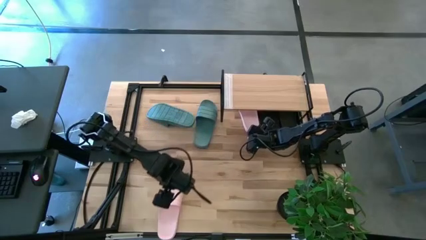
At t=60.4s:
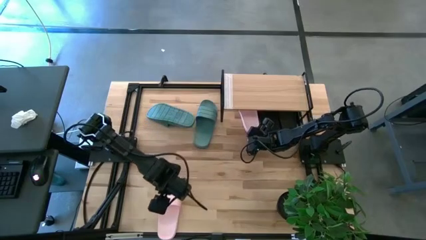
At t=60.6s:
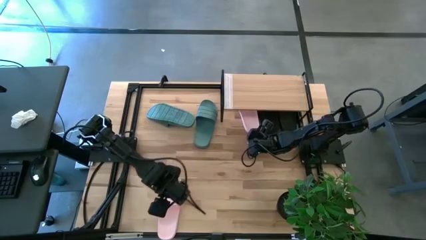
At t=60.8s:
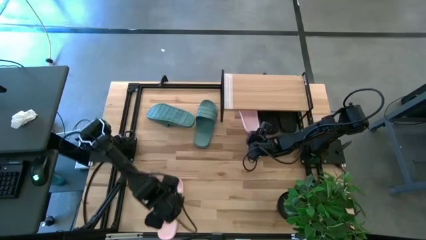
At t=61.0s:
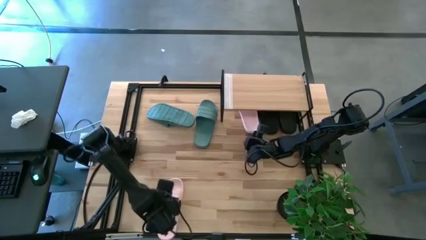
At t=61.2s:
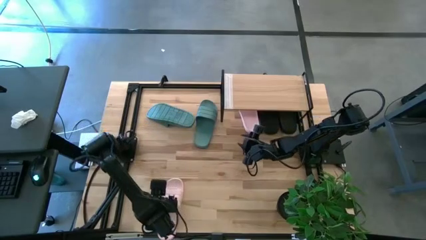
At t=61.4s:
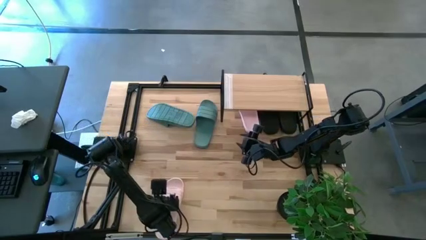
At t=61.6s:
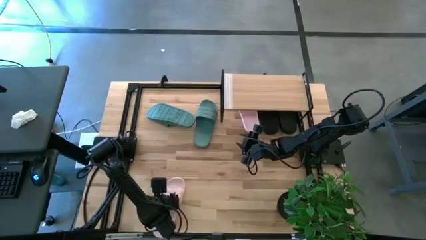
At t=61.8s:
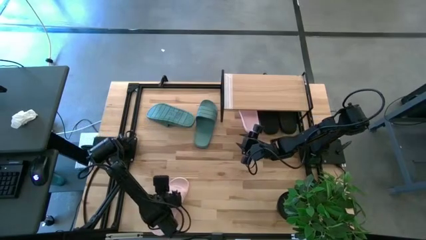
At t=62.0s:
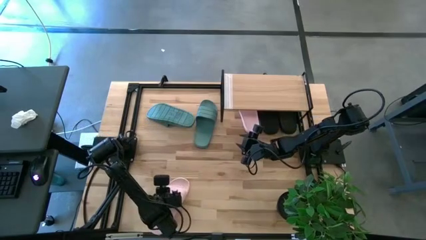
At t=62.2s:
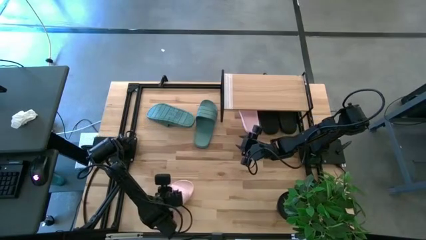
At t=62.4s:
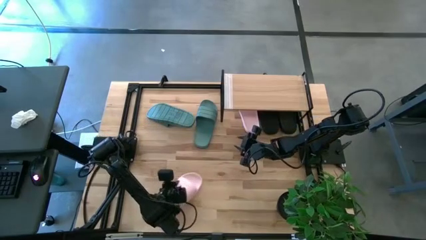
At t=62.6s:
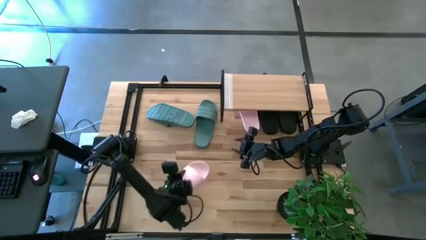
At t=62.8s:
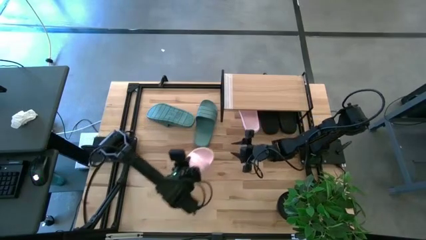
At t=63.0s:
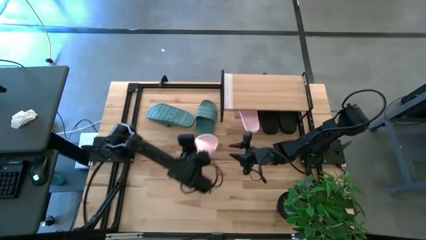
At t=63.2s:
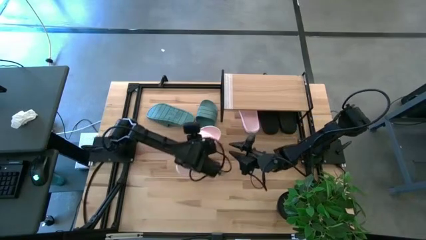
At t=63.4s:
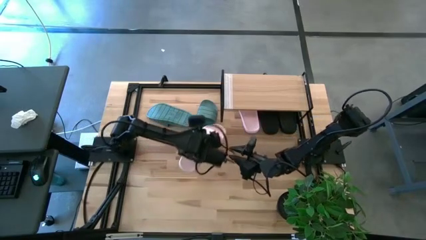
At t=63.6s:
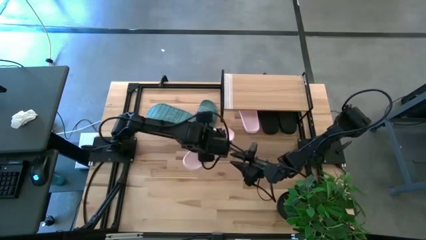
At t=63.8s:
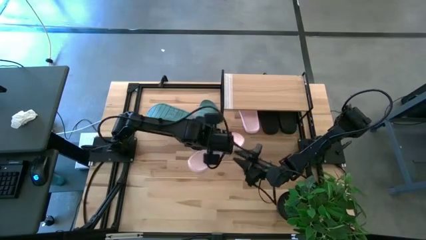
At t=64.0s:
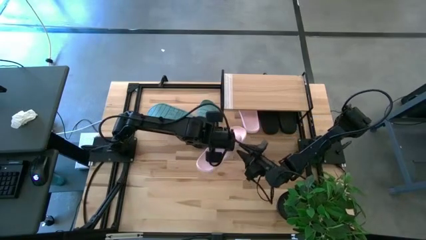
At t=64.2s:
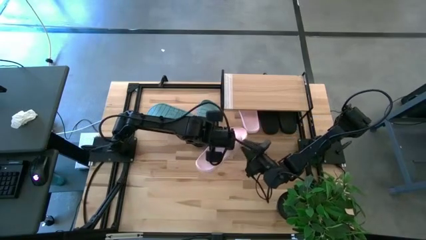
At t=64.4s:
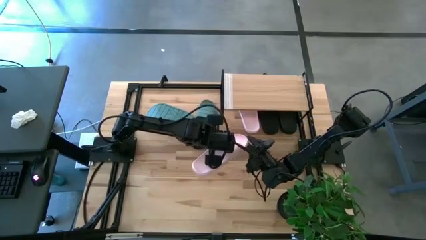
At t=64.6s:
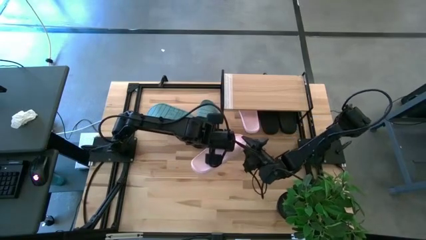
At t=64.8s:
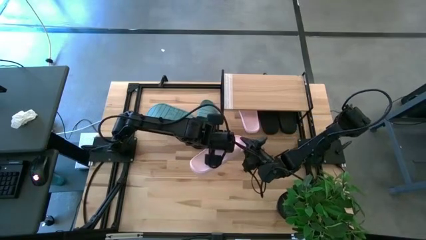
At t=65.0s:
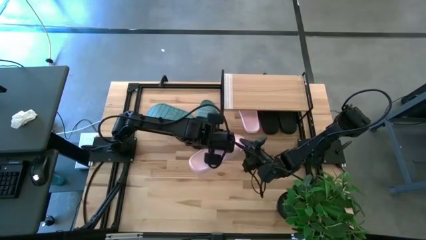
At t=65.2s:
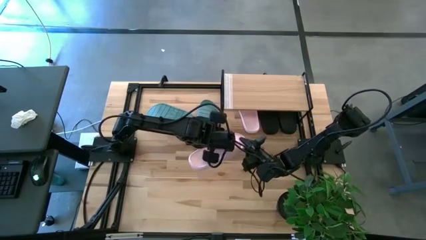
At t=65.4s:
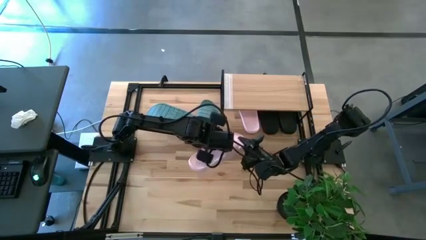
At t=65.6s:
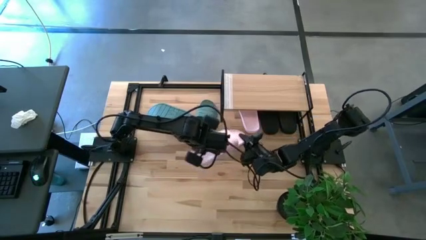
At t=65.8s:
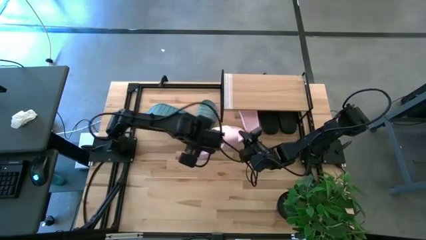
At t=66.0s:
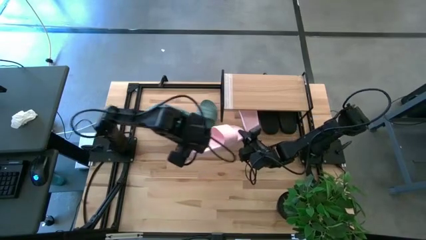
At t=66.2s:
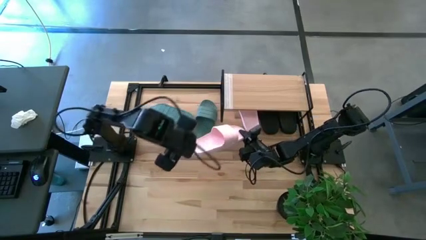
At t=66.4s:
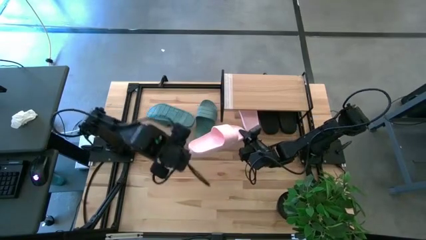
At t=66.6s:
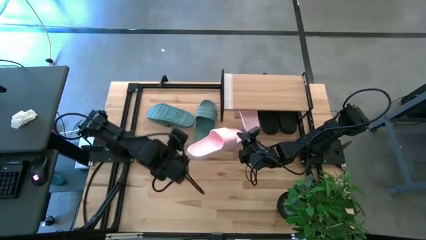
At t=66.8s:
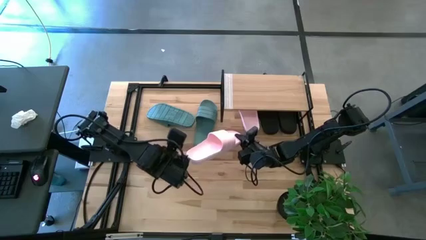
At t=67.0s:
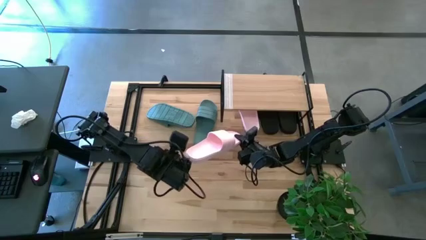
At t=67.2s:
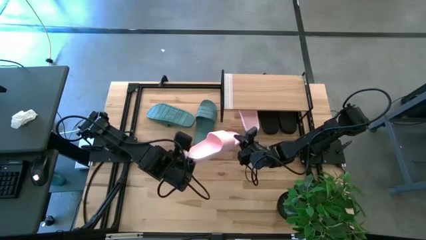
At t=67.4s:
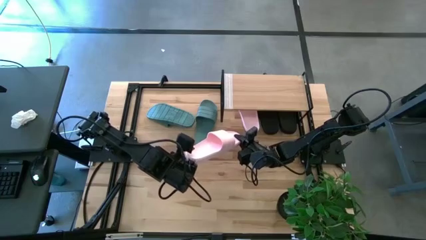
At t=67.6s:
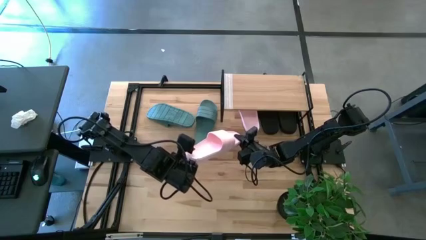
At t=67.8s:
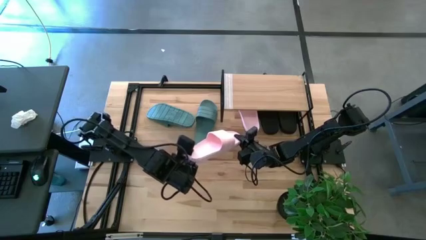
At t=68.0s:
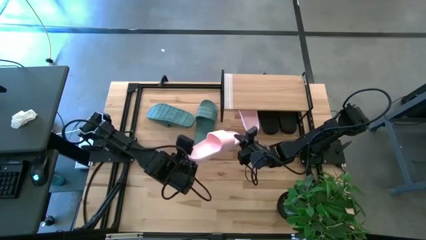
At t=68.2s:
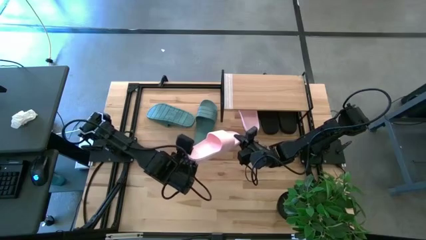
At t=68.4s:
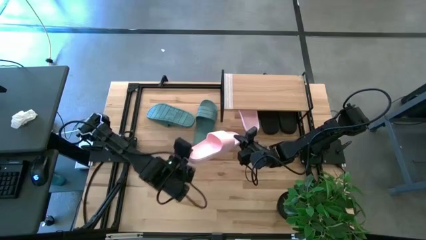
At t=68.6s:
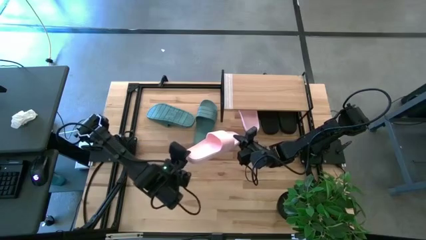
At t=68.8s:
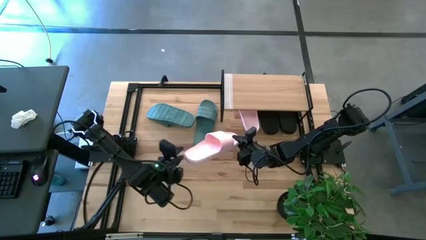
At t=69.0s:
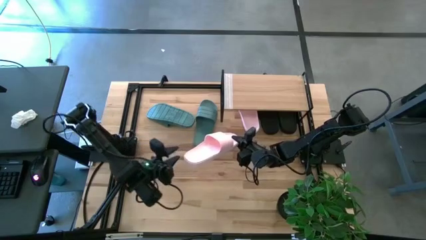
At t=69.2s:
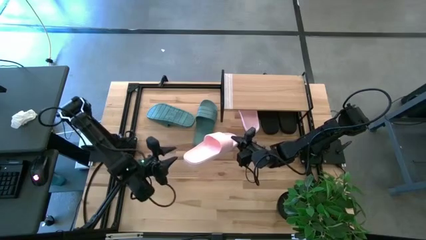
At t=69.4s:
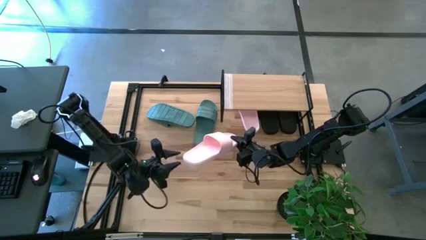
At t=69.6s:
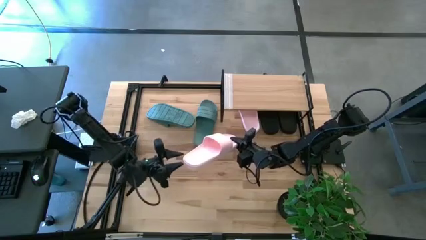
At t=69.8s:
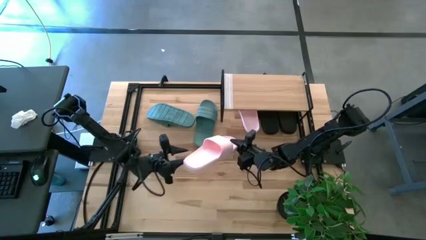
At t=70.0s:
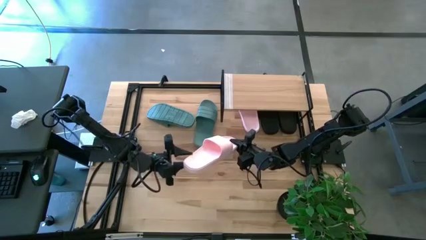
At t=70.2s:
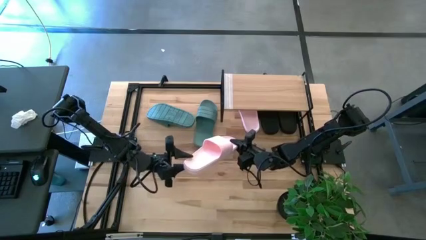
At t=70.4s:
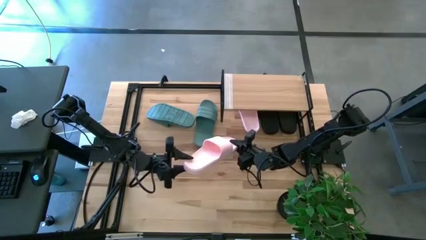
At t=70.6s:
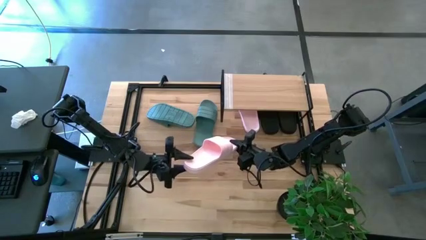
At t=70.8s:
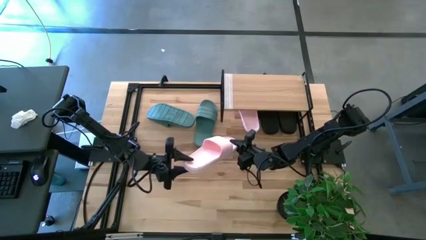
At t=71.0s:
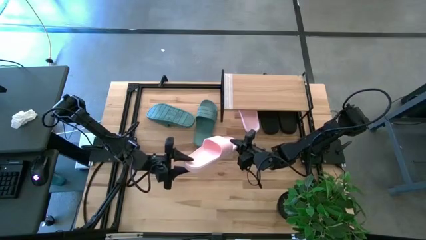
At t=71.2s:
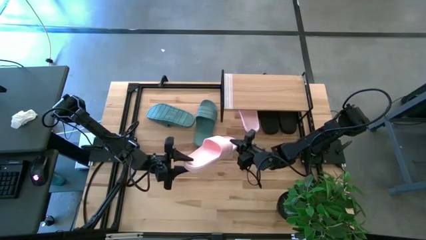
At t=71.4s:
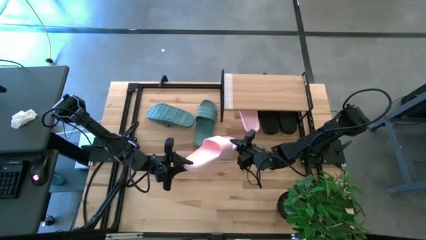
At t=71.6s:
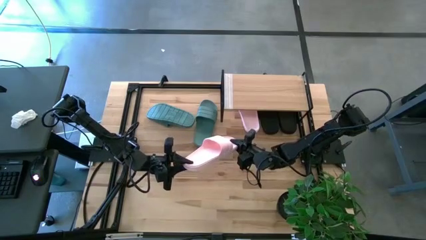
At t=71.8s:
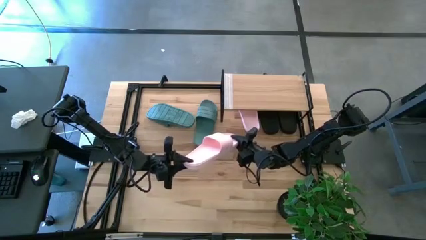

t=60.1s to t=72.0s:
Task: Pick and place slides into the shelf
Put the pink slipper under the shelf
